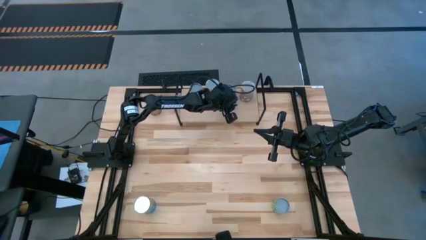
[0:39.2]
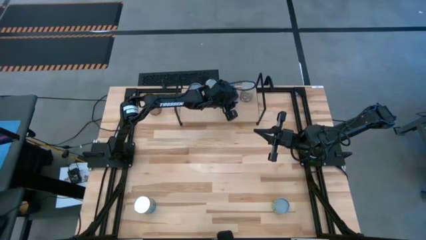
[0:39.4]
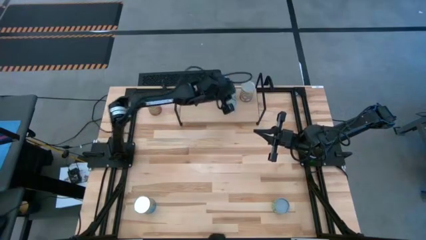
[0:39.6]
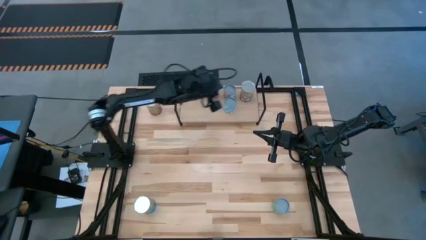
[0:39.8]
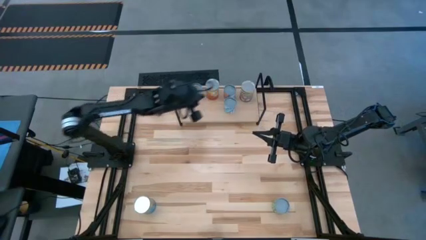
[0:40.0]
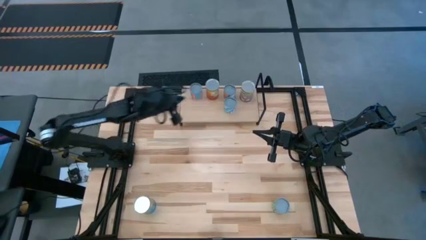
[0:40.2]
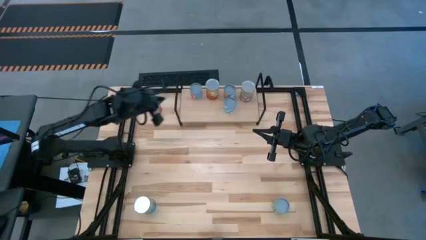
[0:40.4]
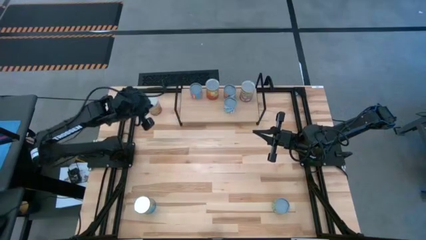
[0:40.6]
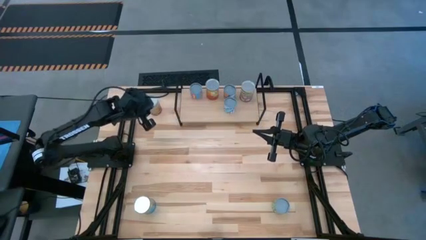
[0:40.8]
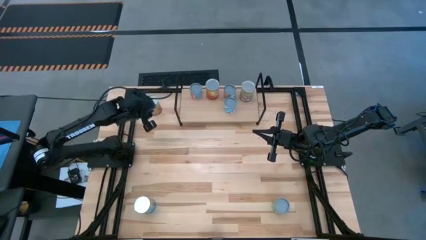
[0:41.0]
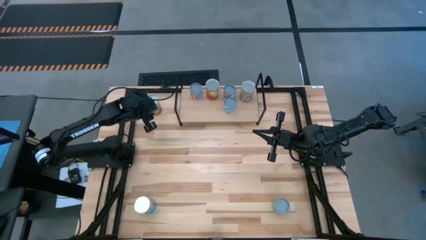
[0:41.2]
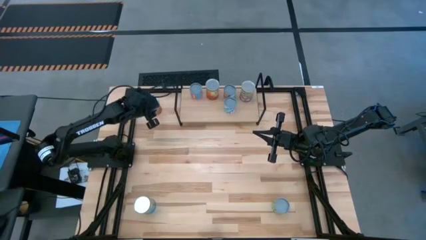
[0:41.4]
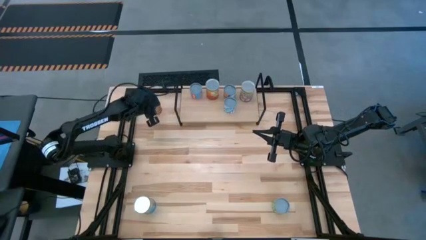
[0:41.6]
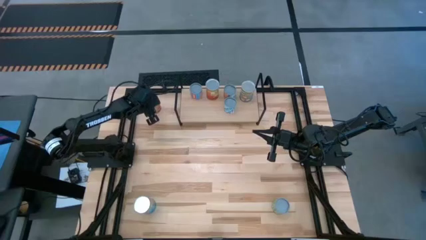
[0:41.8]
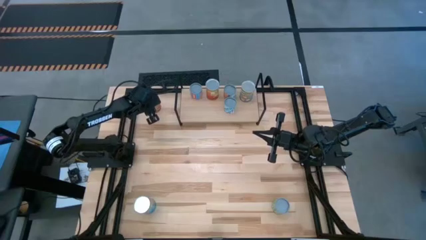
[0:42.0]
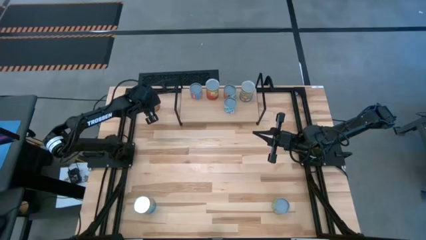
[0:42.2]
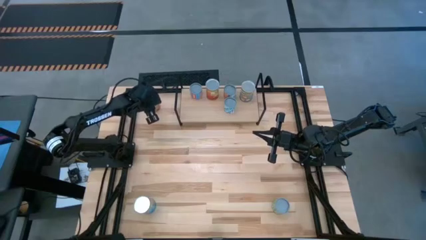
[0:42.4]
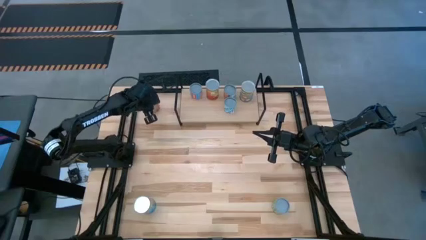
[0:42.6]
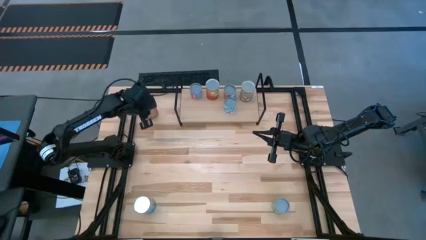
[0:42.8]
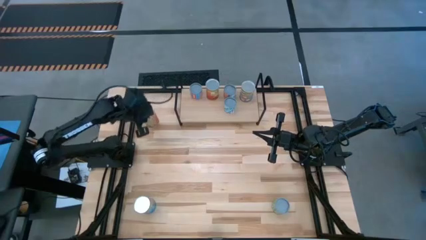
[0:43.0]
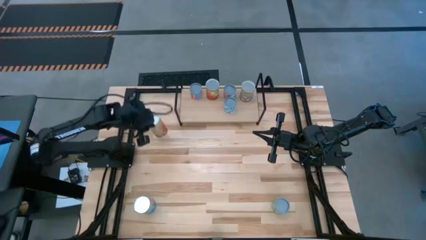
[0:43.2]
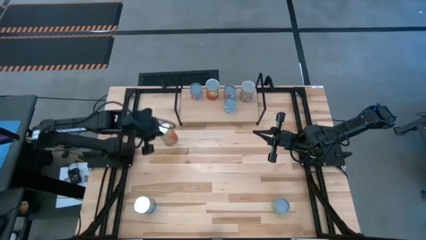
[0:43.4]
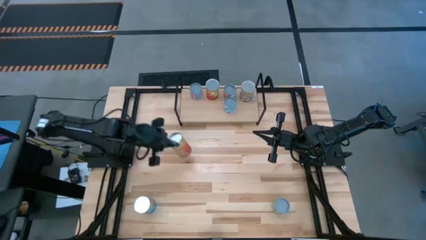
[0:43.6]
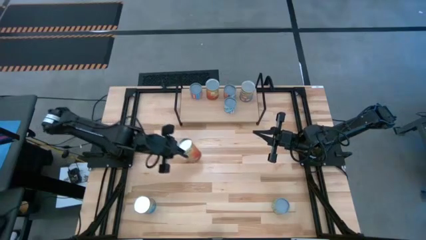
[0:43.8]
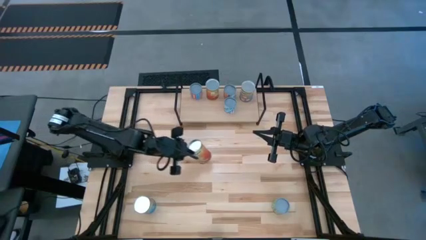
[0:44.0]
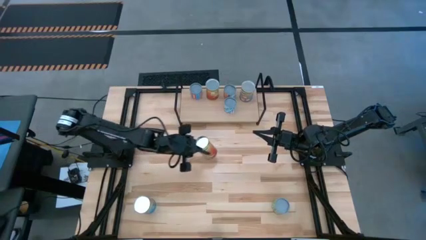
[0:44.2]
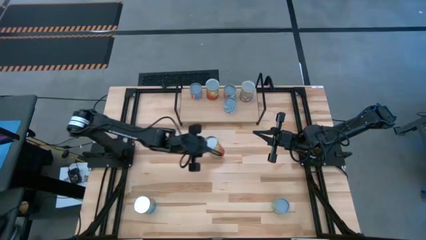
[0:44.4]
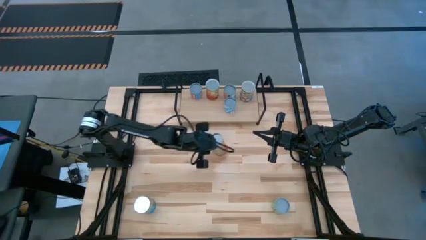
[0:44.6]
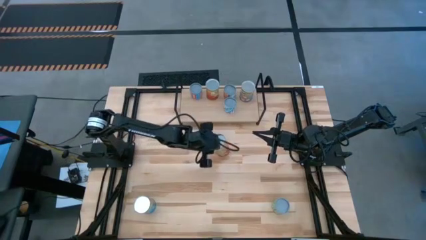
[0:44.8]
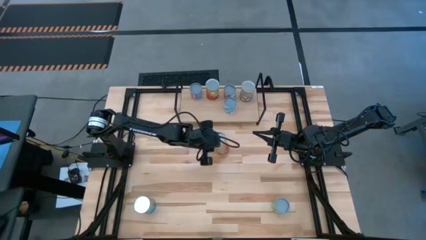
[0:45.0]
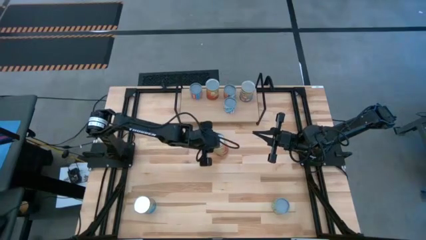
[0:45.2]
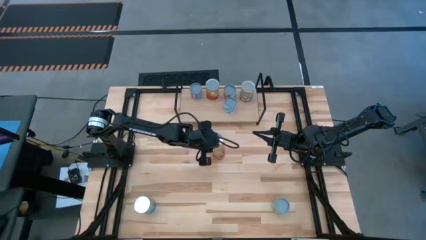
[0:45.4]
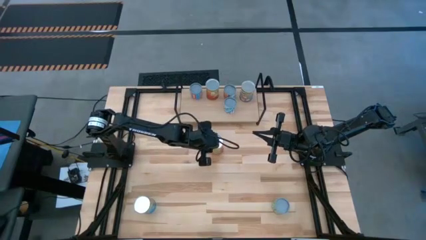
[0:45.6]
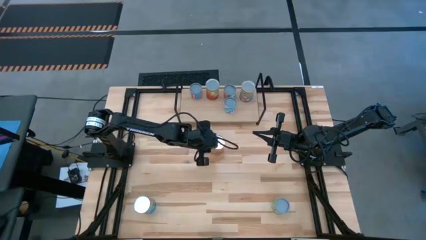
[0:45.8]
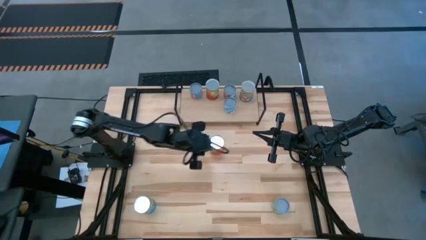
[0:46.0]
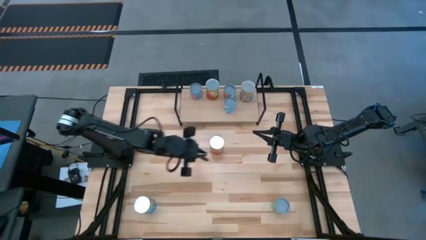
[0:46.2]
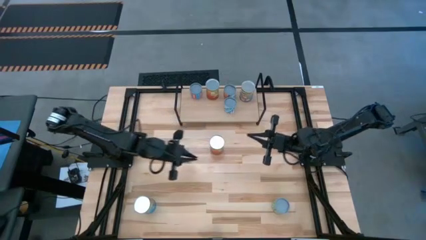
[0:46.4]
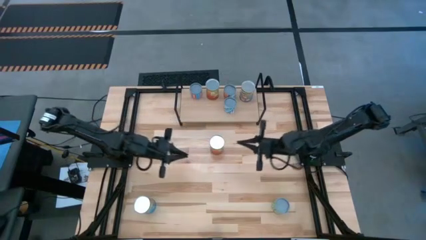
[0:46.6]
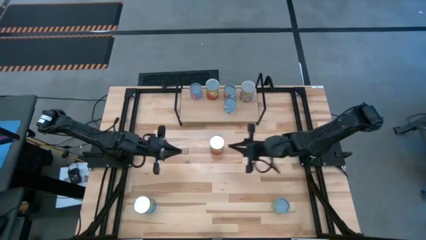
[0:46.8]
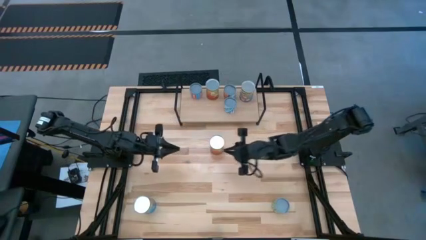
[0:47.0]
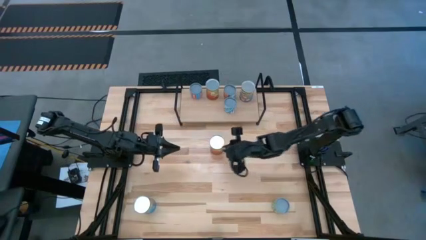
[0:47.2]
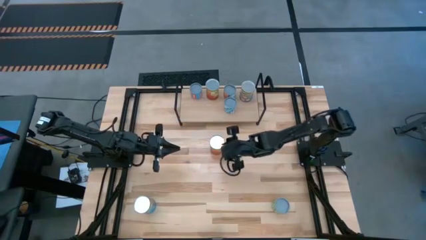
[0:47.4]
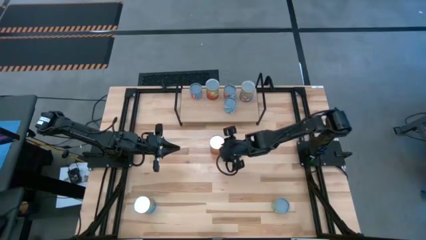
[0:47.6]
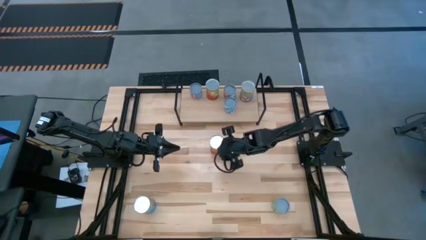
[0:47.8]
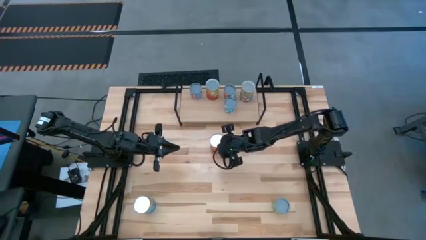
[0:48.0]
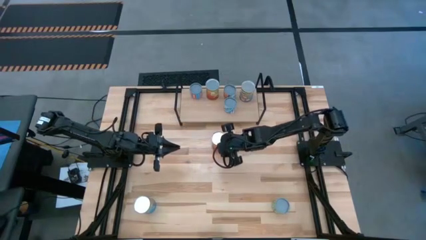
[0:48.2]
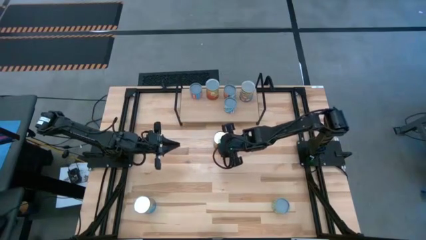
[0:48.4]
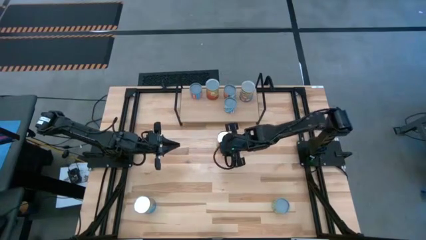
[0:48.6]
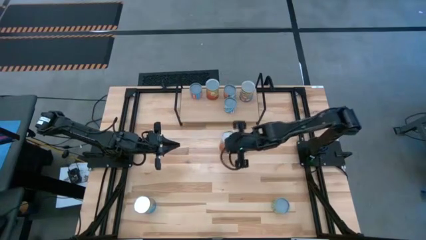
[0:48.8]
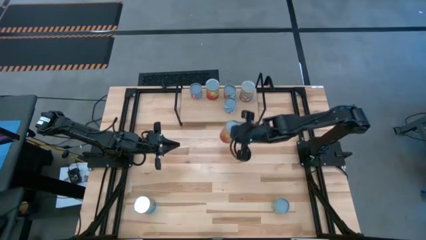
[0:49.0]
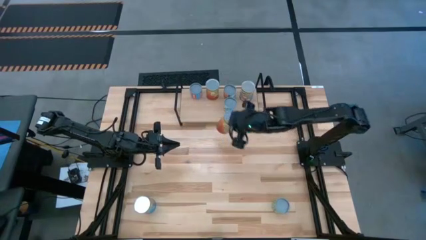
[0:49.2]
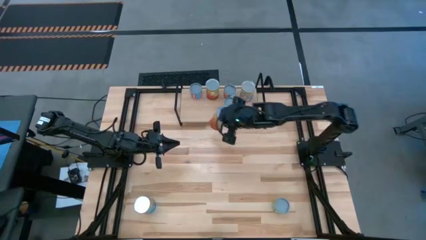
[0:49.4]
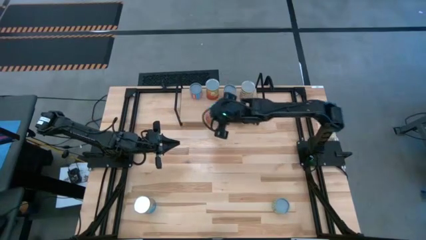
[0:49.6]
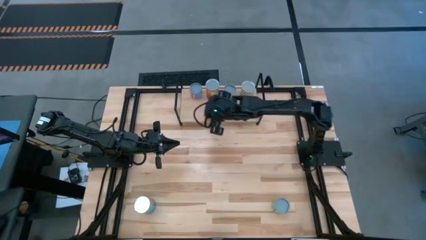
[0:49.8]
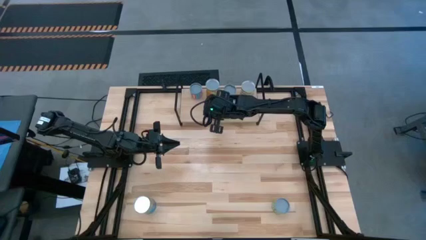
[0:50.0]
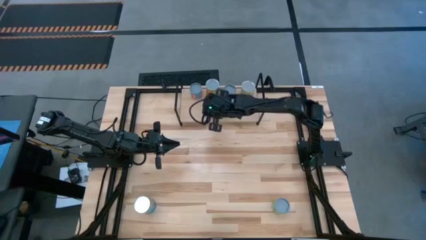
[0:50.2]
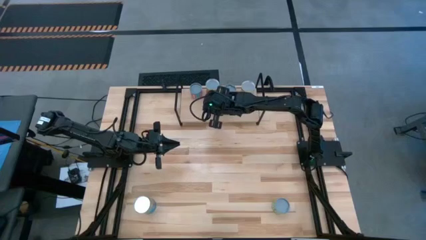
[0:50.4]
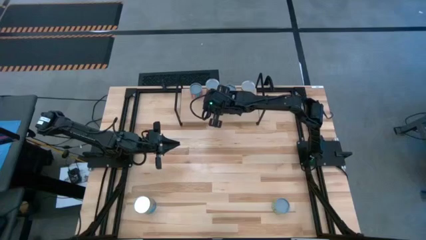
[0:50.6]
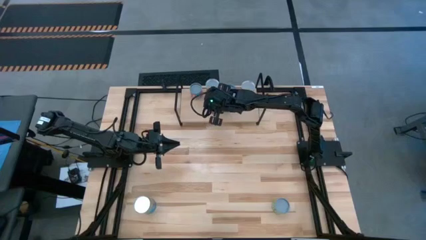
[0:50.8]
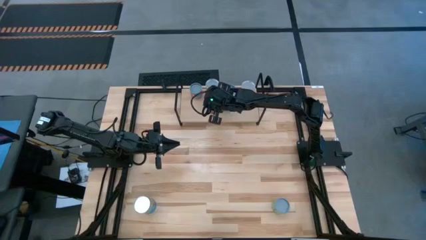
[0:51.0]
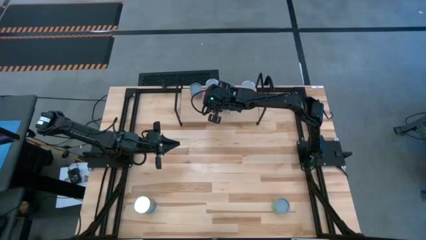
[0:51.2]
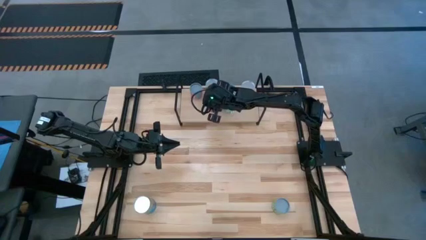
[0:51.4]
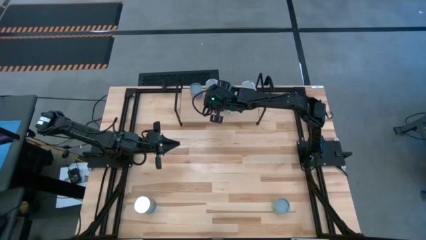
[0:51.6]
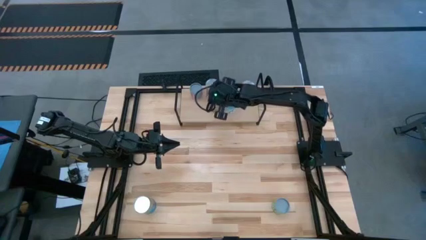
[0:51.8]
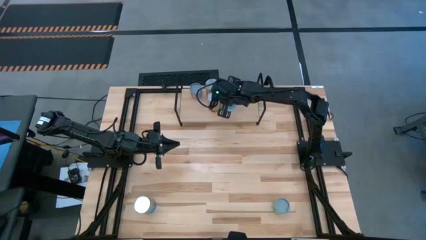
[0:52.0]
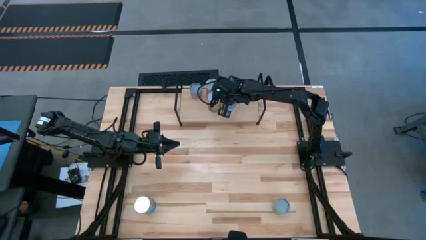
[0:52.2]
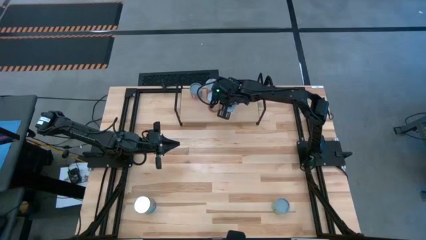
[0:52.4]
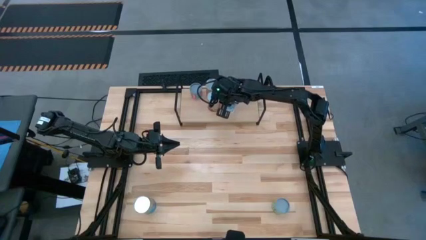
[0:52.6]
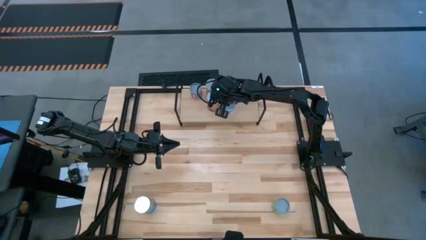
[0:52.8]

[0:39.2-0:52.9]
Task: Pick and place cans onto a shelf
Put the orange can on the shelf aligned with the other orange can
